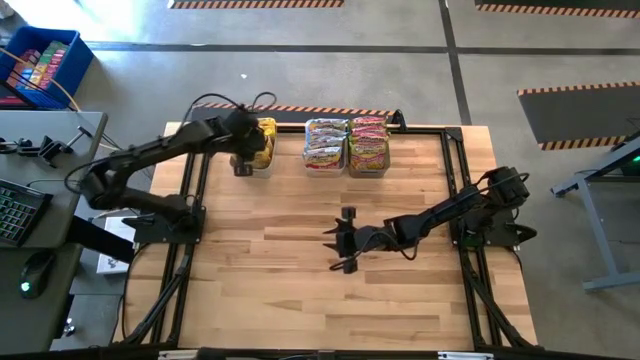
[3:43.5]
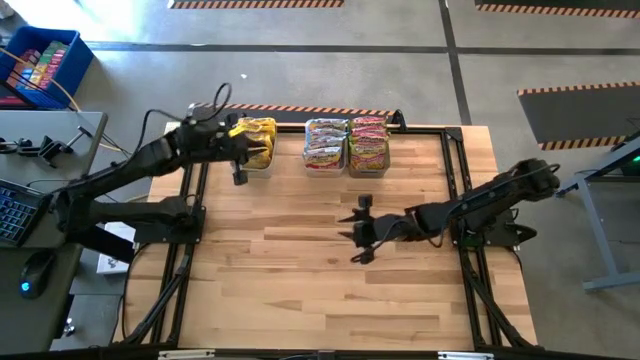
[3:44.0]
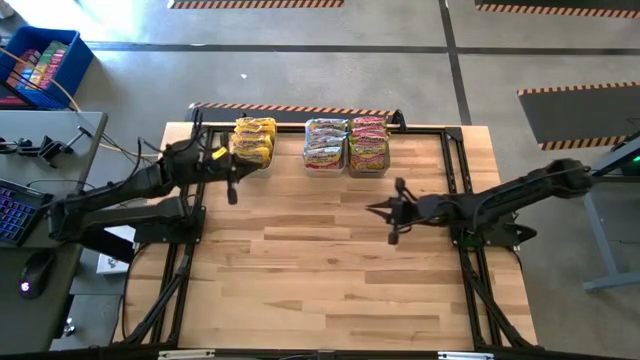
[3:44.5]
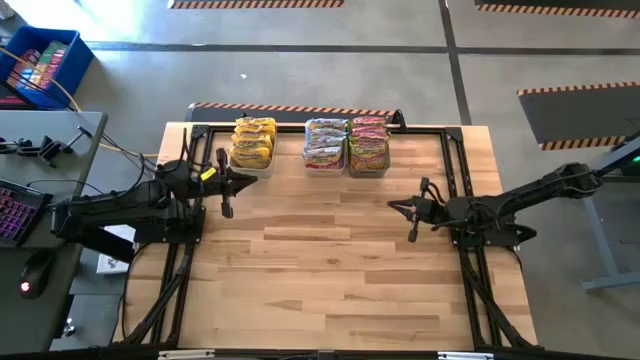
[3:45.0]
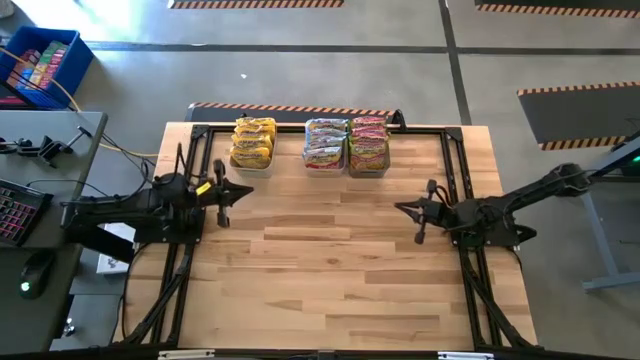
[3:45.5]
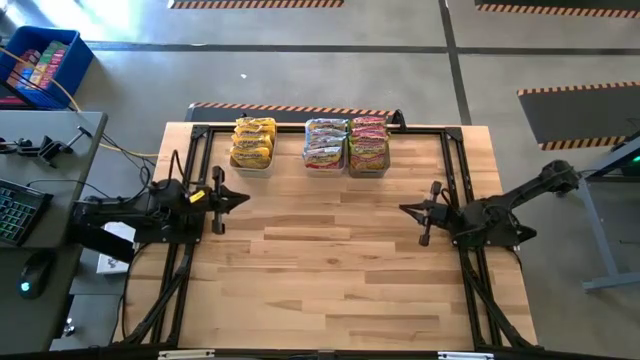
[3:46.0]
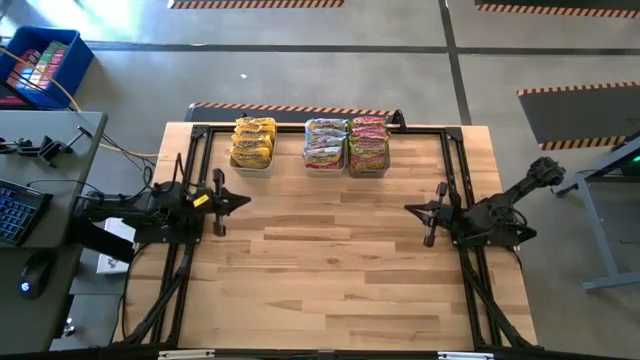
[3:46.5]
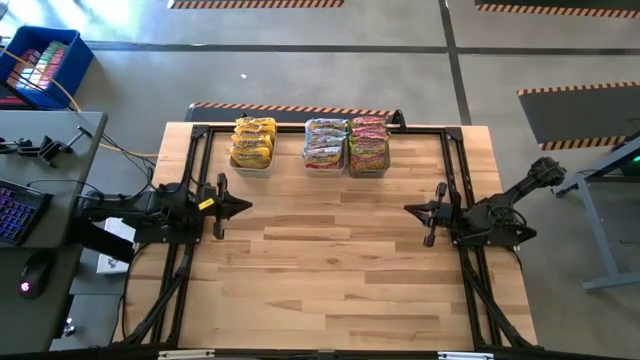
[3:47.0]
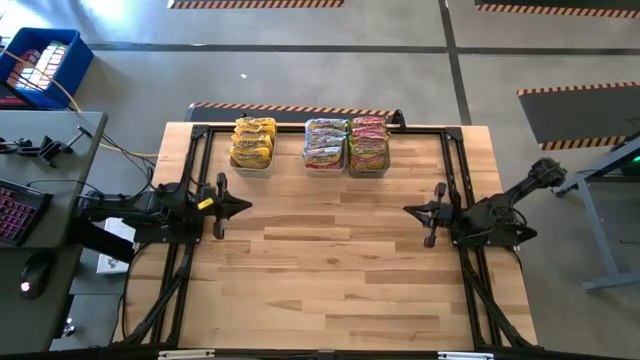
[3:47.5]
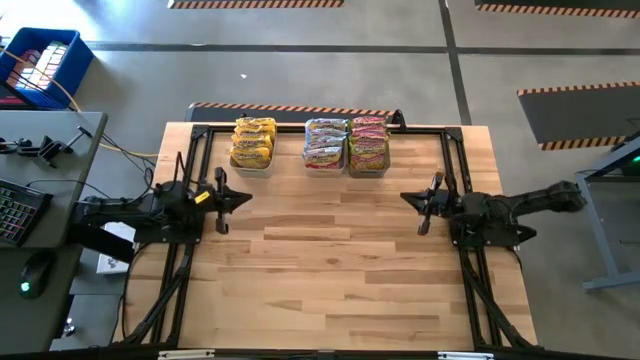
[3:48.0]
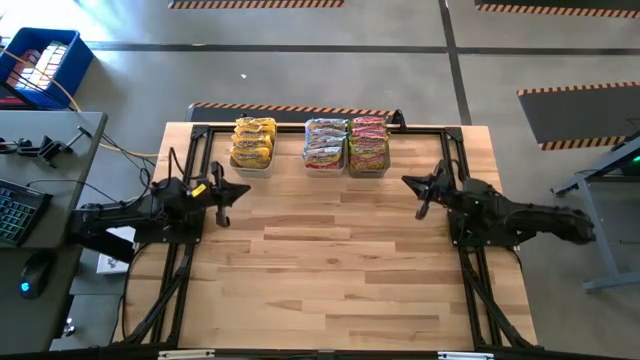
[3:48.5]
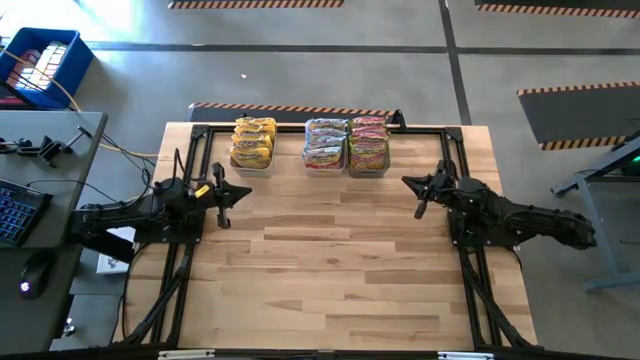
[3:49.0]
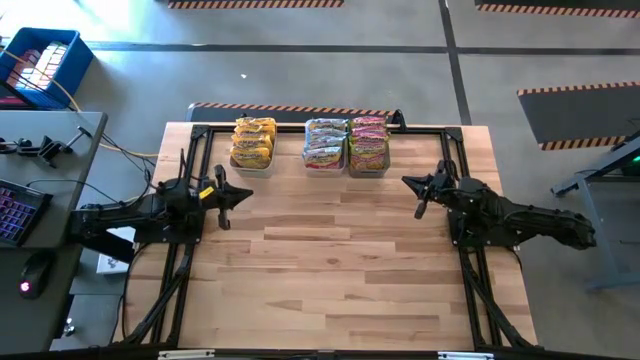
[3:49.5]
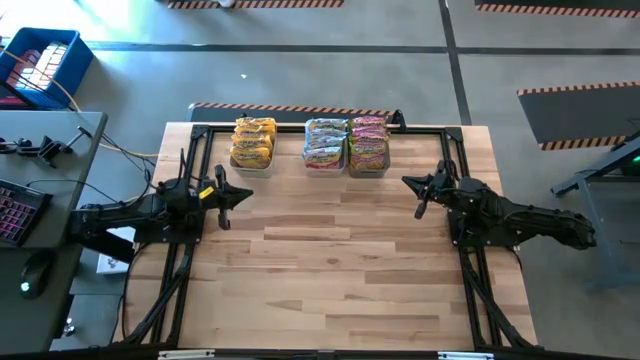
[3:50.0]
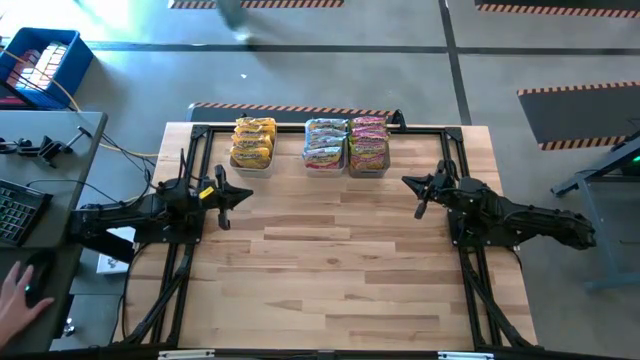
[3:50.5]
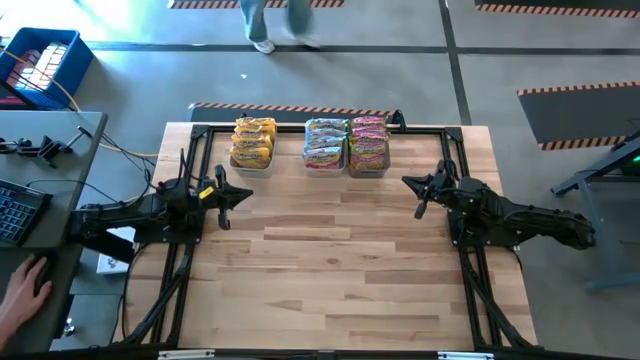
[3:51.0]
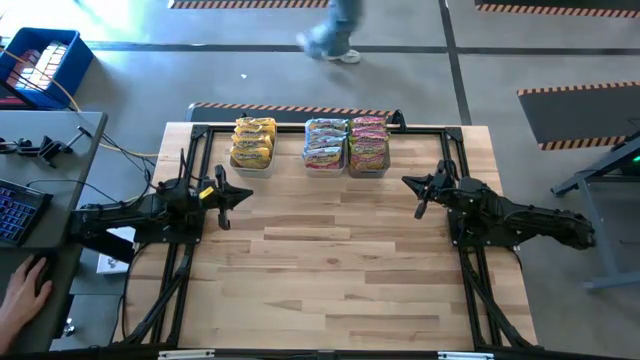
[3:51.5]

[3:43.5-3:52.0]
Task: Sort Maruchan noodles
Return to Home Position

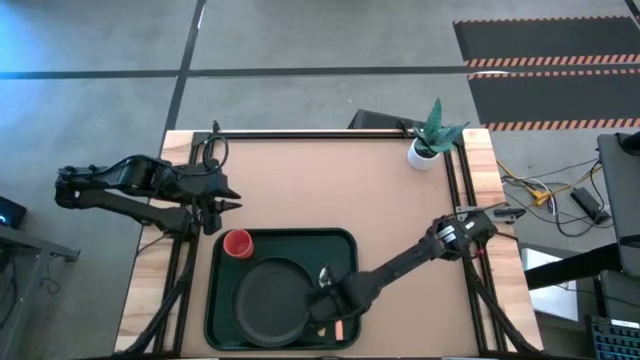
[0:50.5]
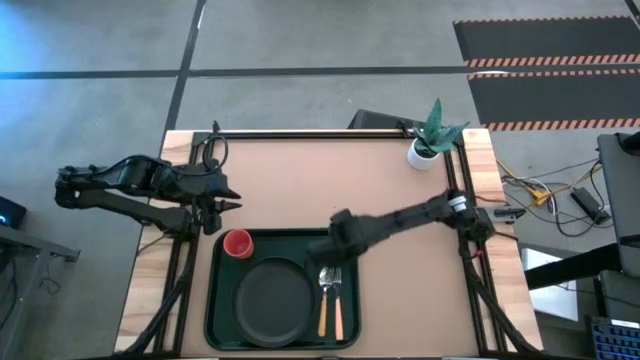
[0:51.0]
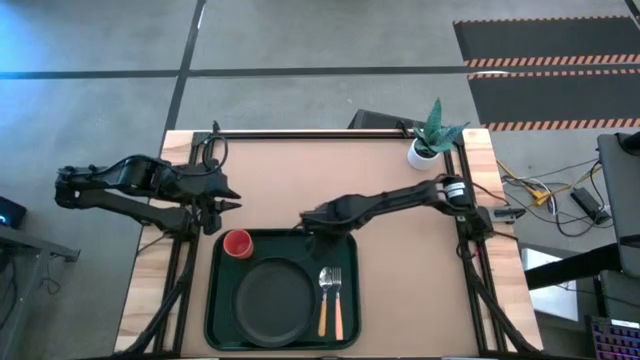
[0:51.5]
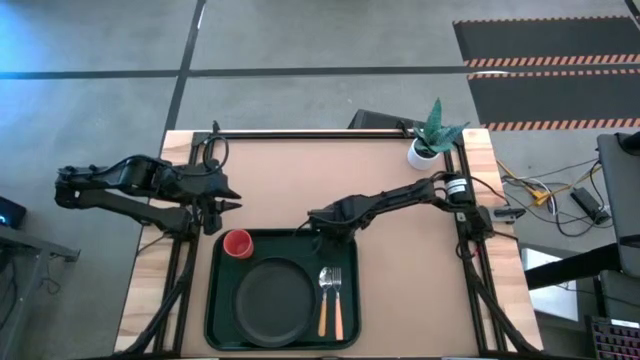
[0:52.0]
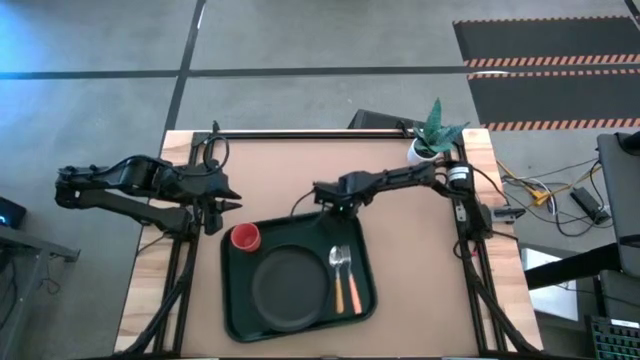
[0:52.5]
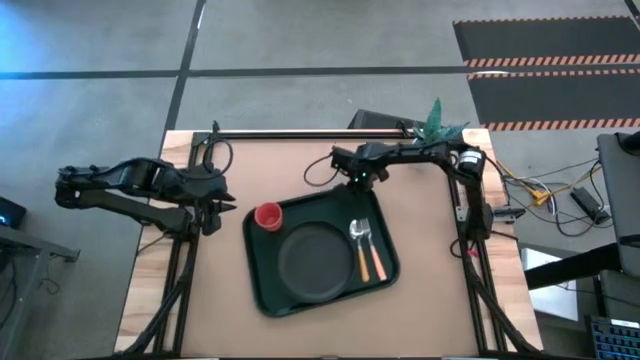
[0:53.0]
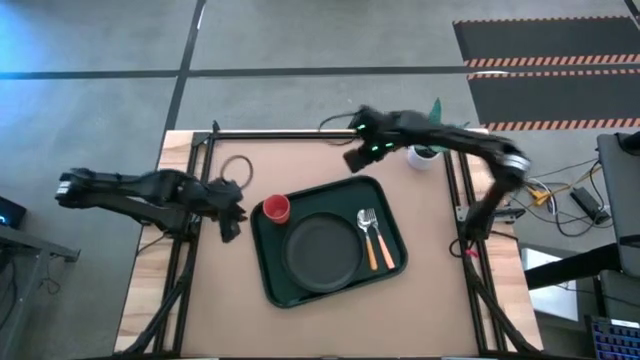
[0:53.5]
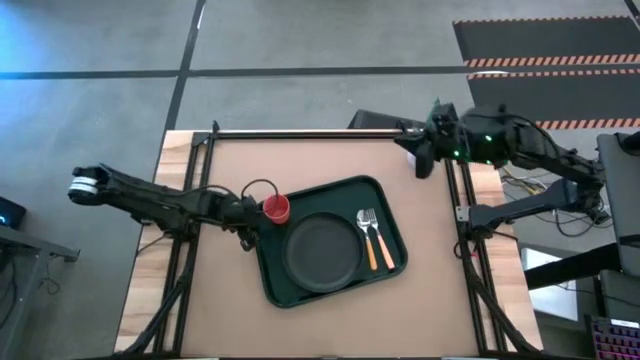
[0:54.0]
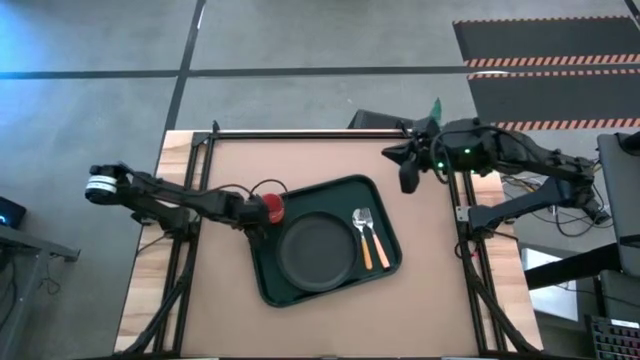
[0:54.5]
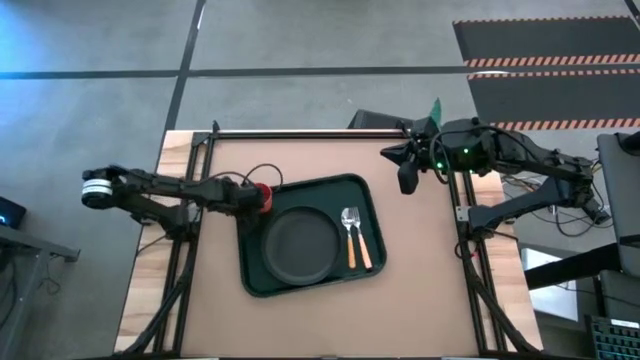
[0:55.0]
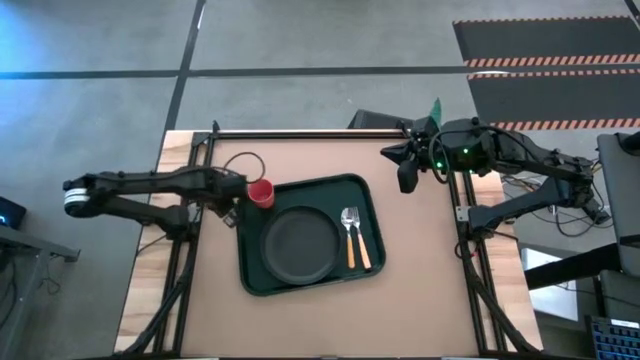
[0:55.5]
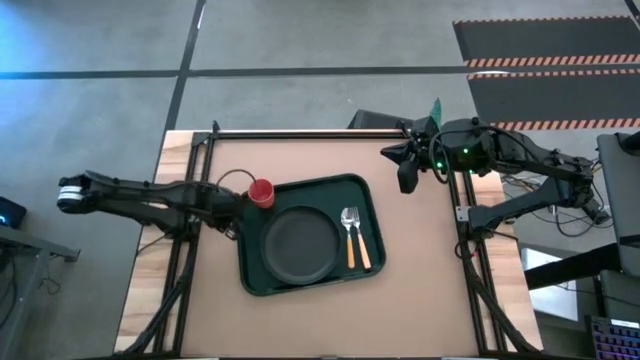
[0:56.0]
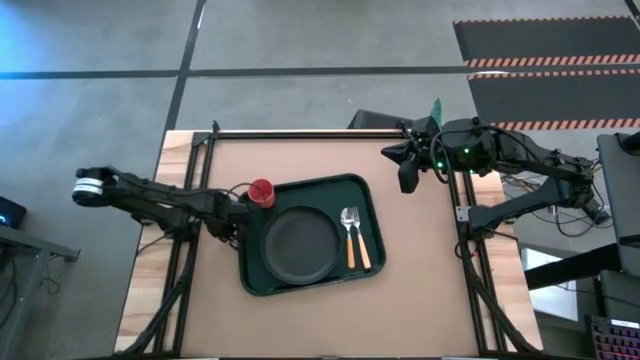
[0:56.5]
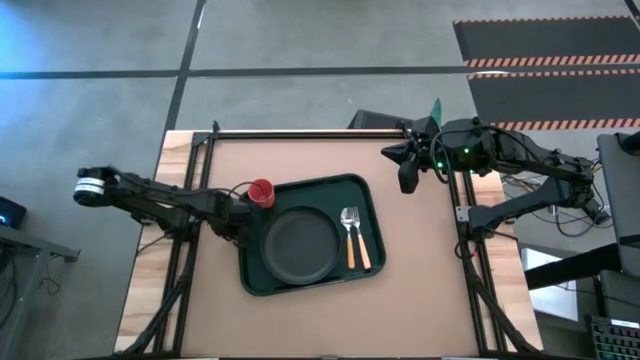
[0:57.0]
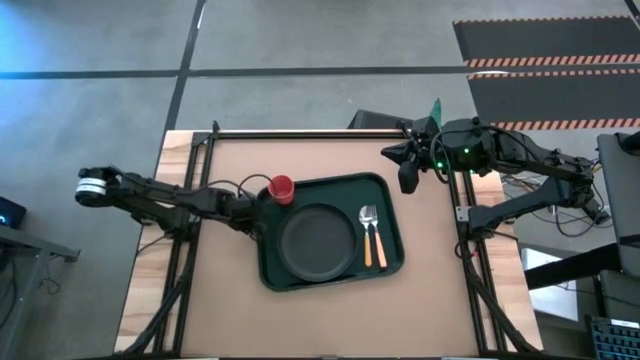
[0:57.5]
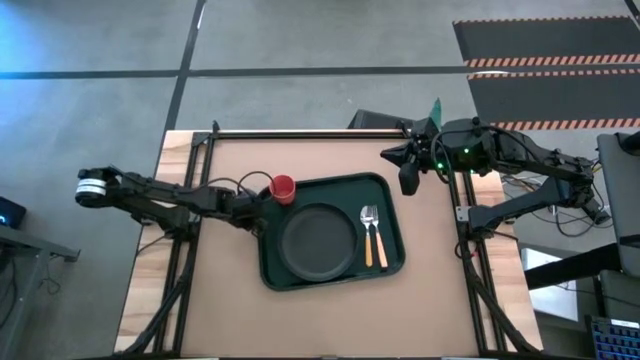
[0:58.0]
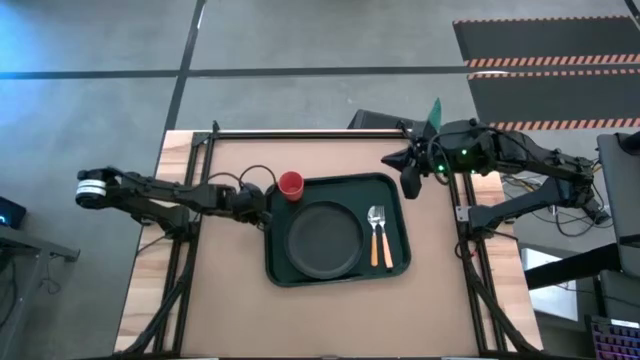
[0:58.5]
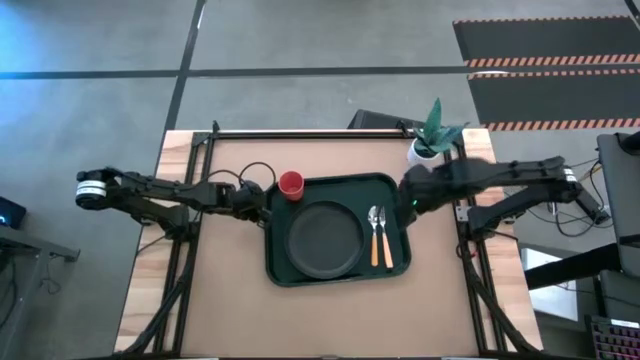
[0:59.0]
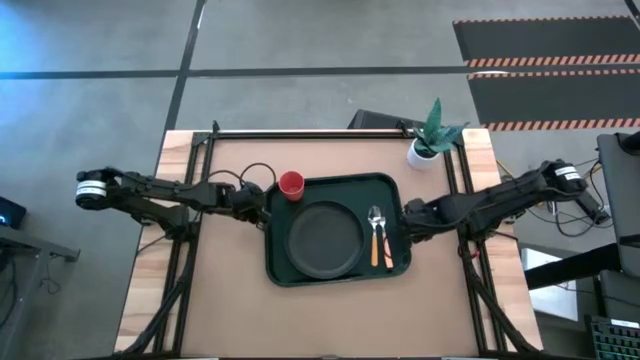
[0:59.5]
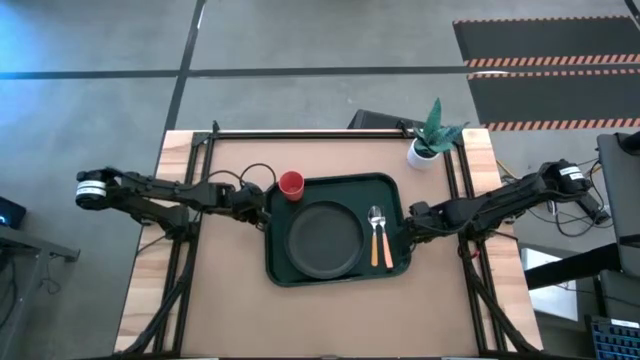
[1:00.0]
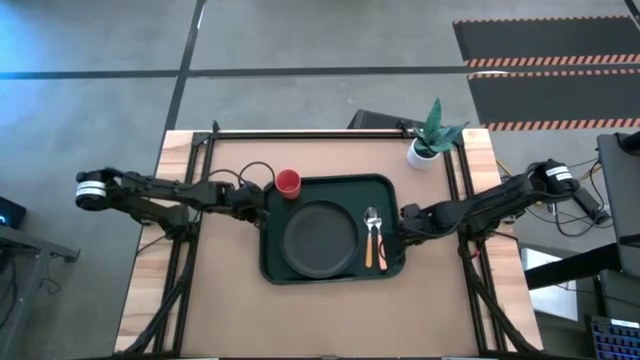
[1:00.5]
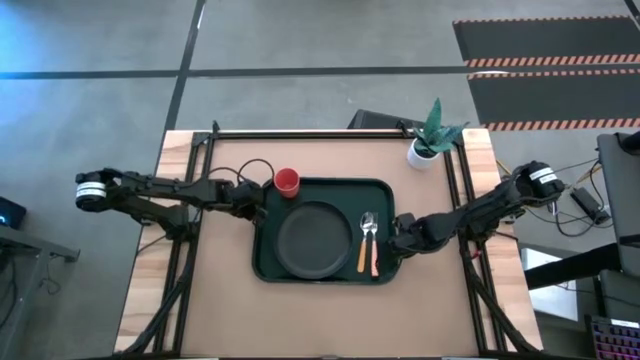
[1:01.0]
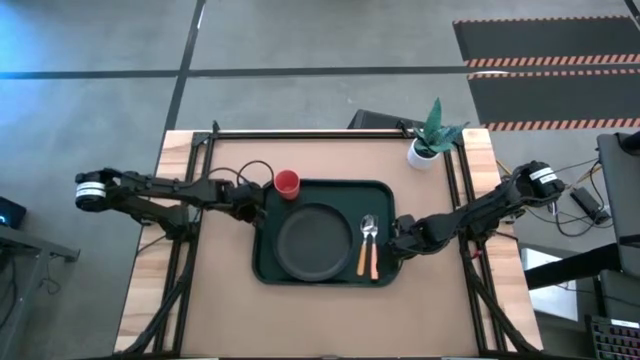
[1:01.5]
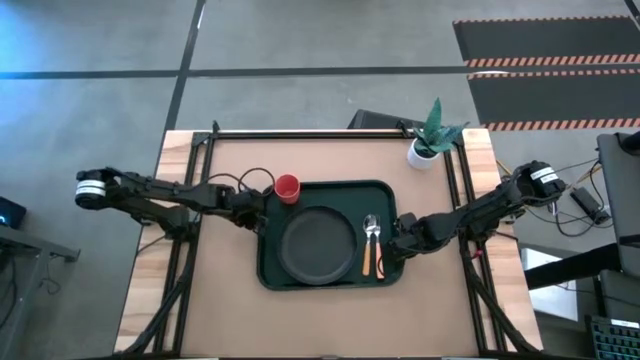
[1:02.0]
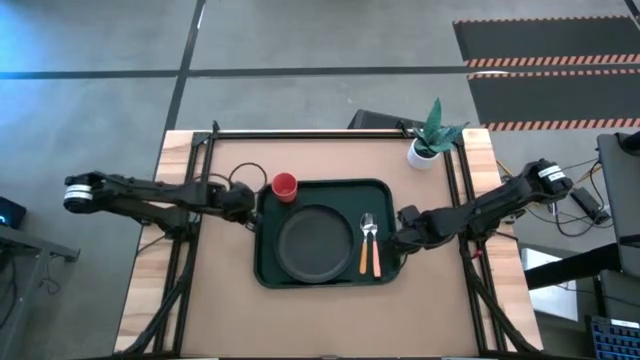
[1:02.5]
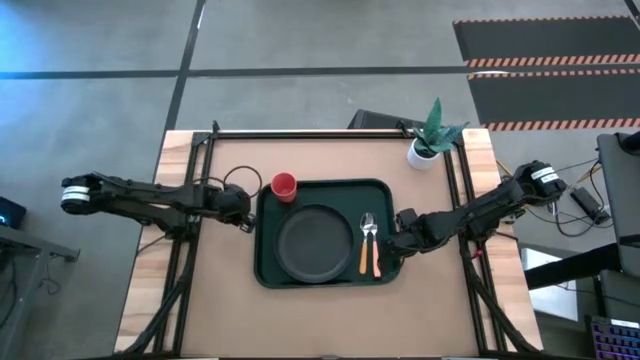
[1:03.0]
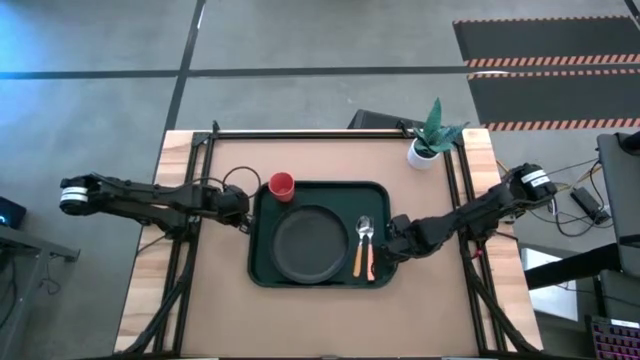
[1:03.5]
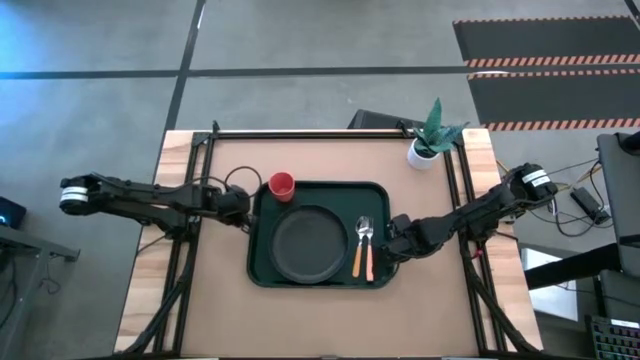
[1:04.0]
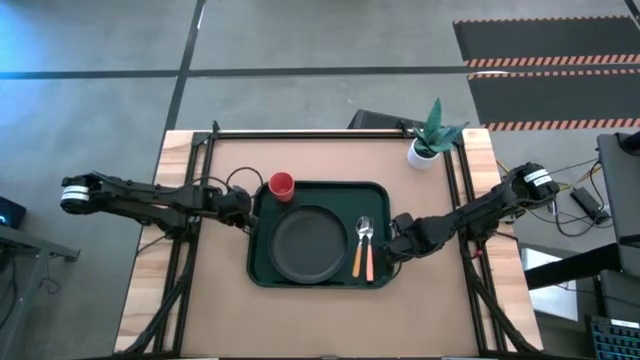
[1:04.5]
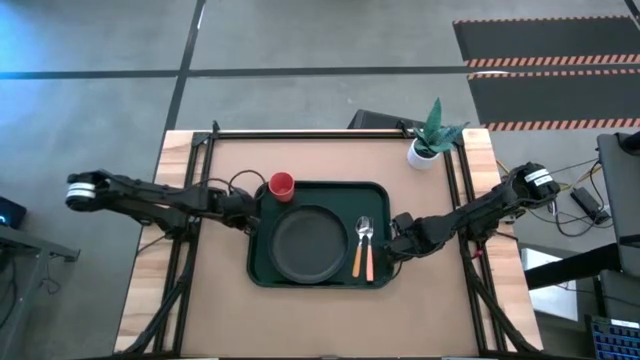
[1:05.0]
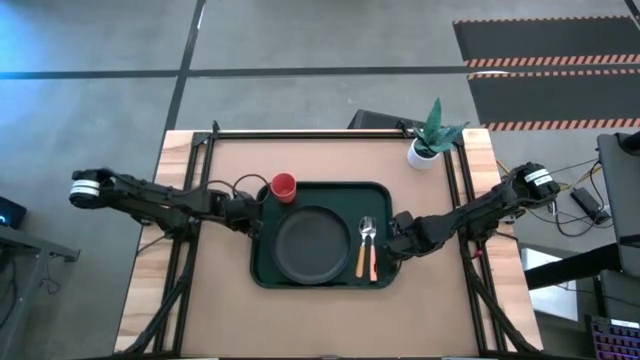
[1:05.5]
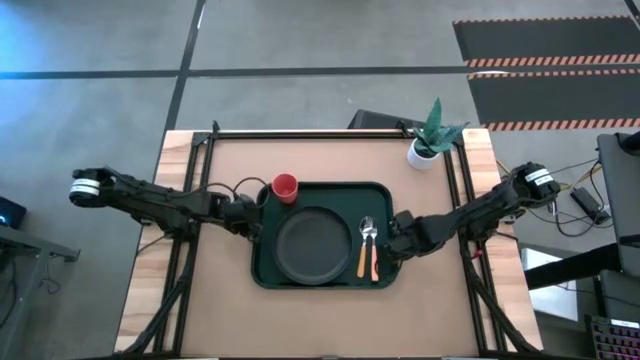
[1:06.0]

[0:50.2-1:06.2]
Task: Pick and place plate/cup/fork/spoon on tray
Adjust the black tray to the center of the table
